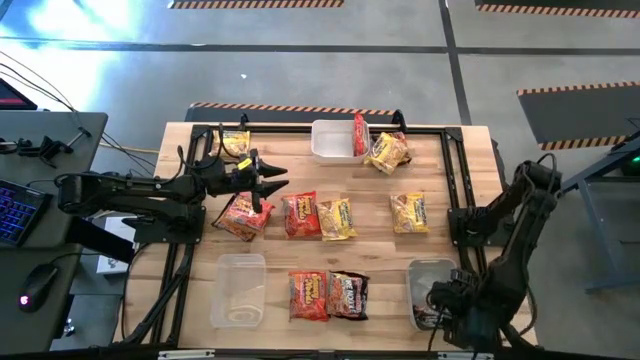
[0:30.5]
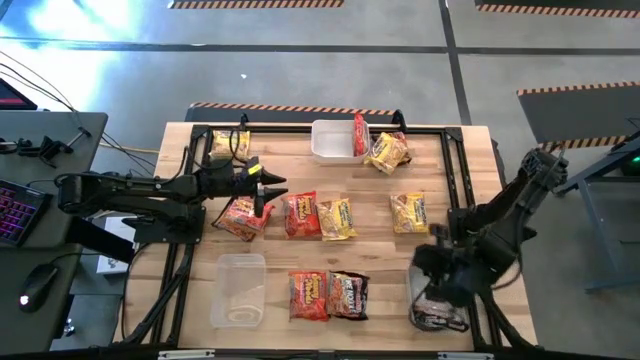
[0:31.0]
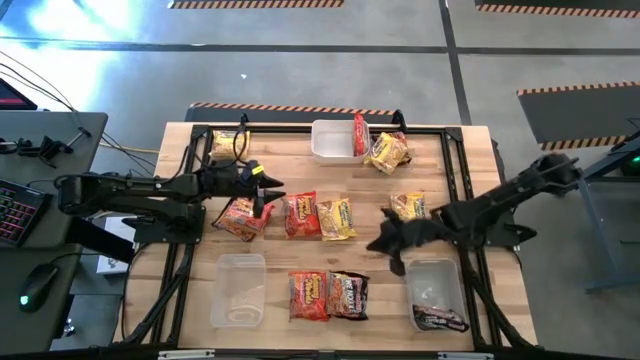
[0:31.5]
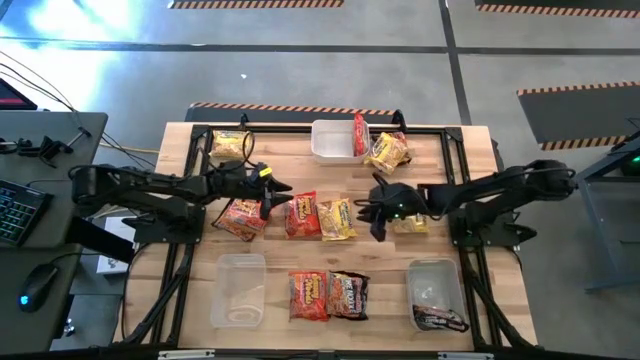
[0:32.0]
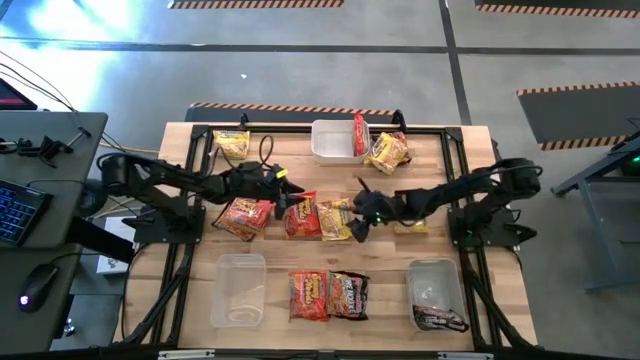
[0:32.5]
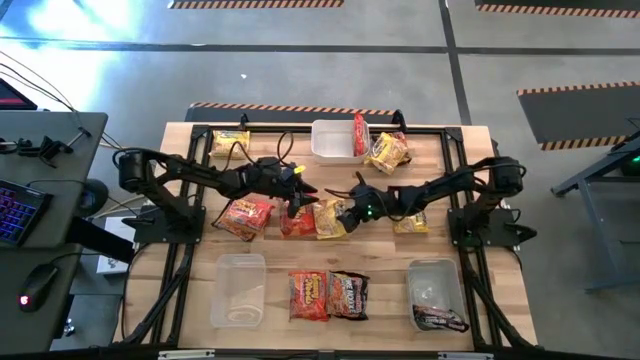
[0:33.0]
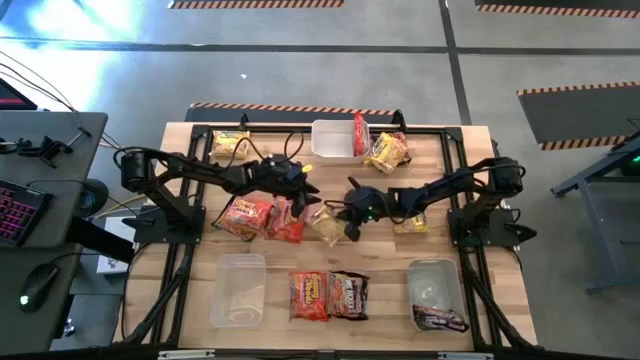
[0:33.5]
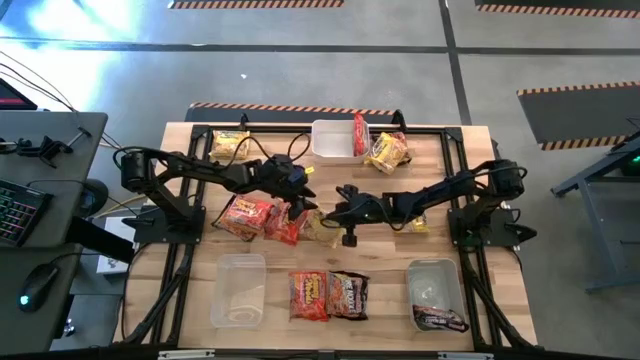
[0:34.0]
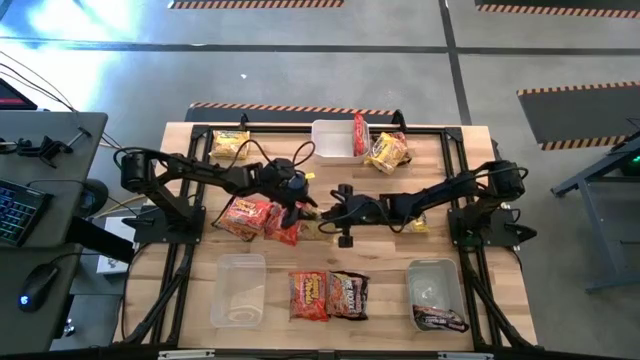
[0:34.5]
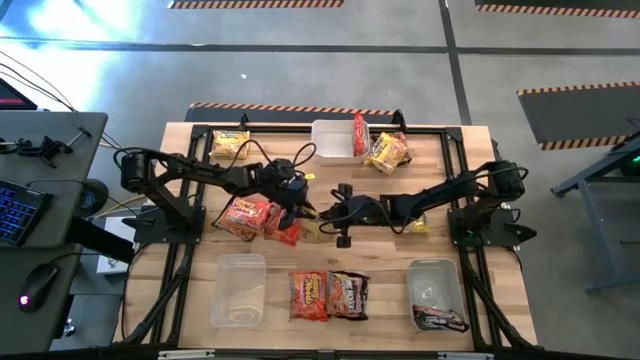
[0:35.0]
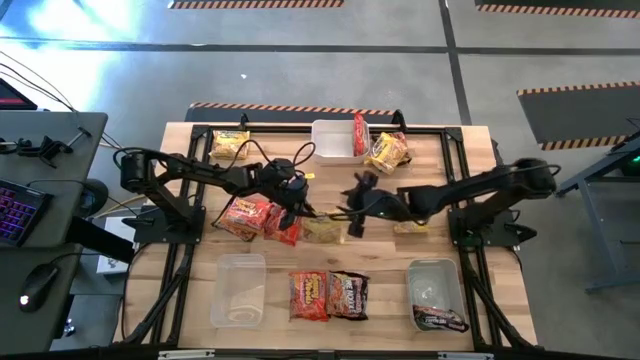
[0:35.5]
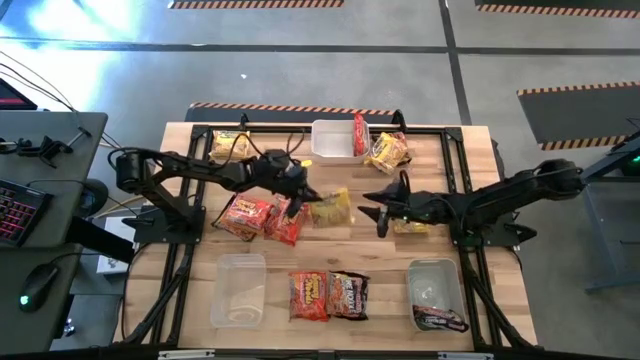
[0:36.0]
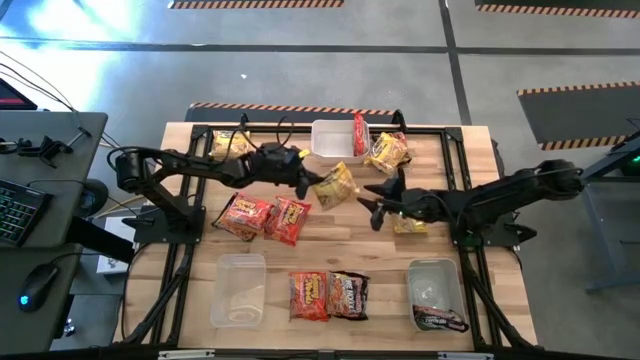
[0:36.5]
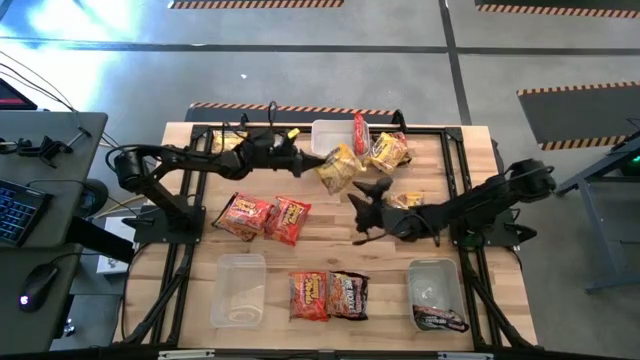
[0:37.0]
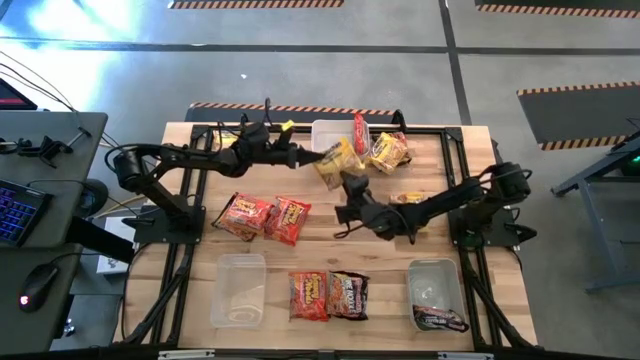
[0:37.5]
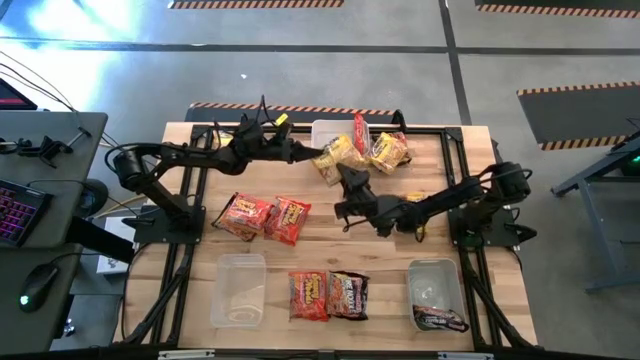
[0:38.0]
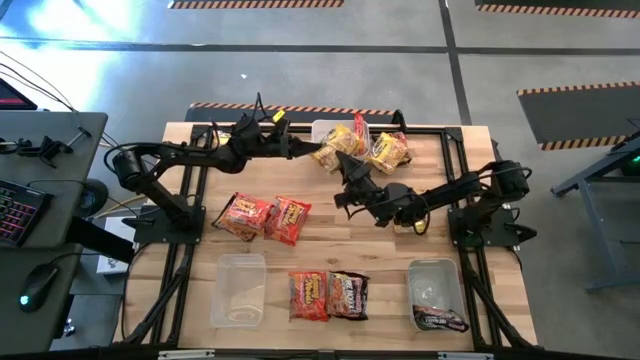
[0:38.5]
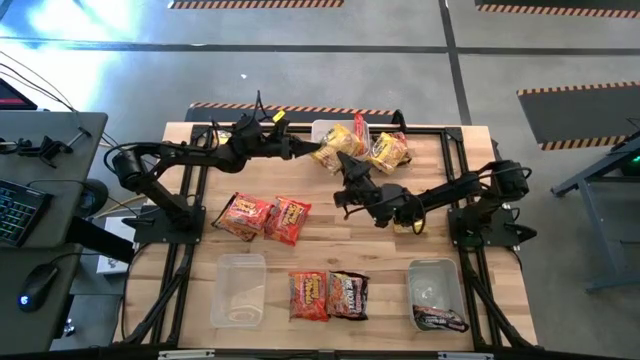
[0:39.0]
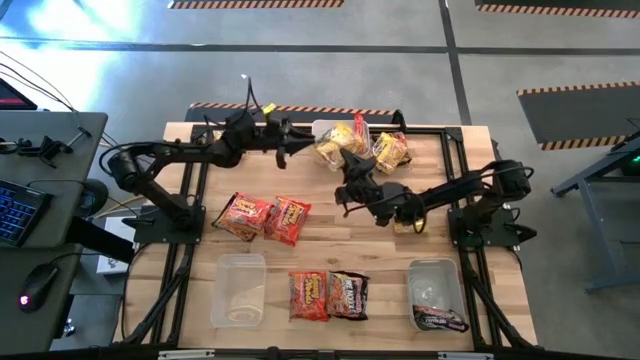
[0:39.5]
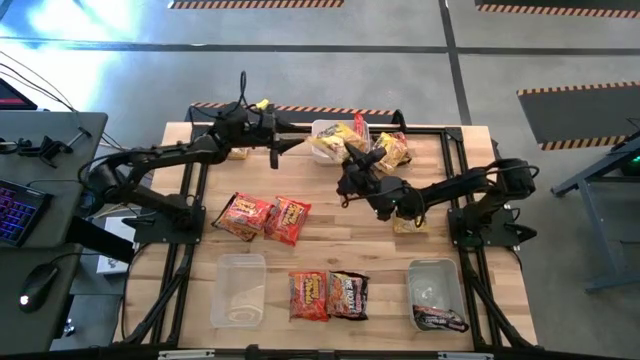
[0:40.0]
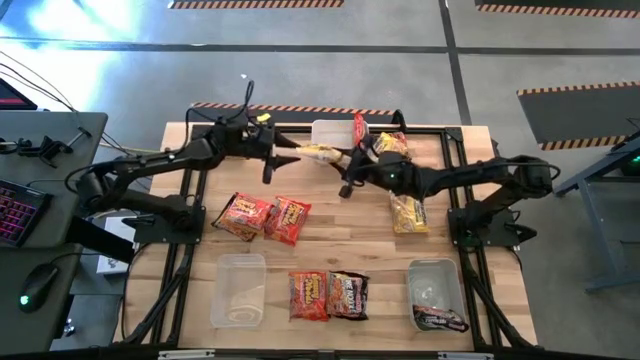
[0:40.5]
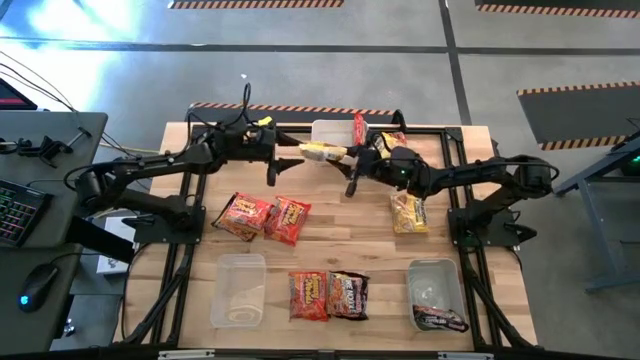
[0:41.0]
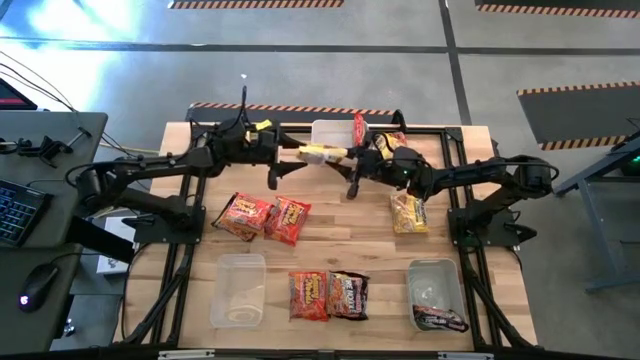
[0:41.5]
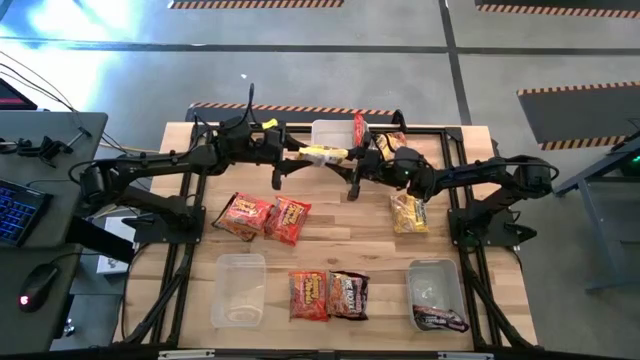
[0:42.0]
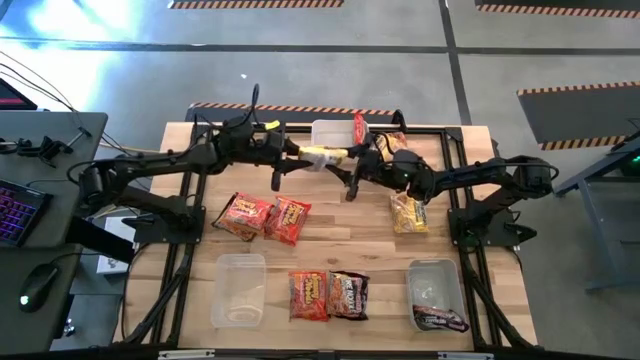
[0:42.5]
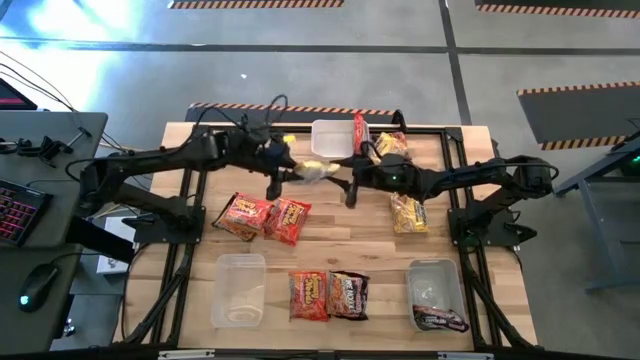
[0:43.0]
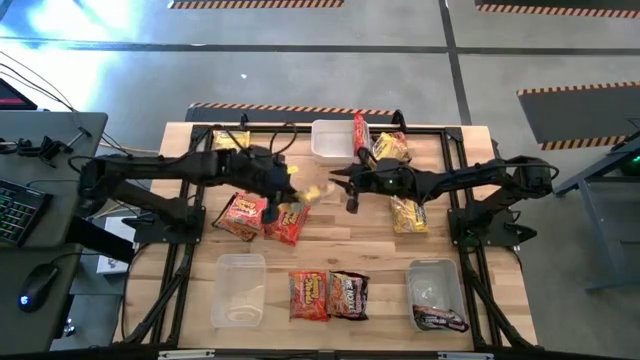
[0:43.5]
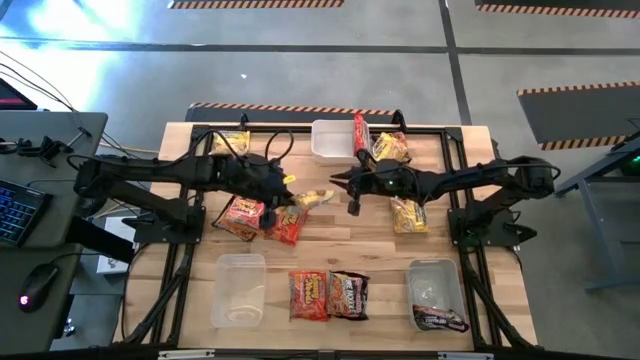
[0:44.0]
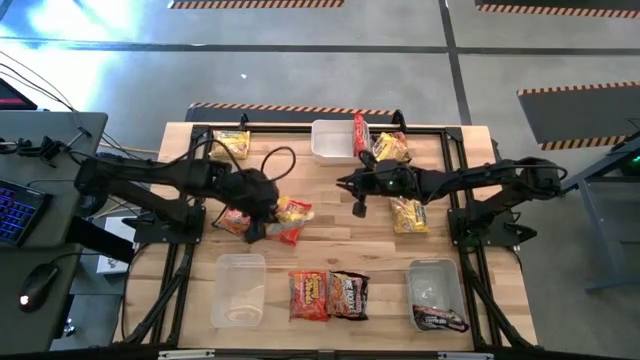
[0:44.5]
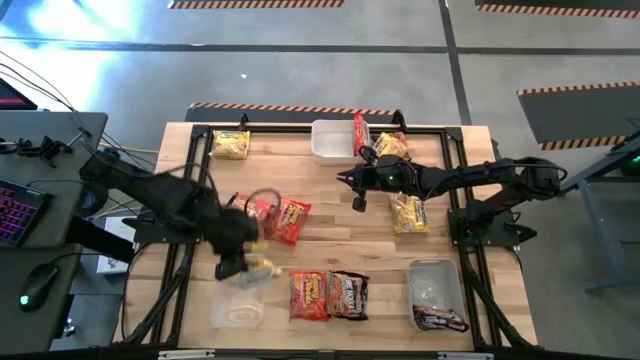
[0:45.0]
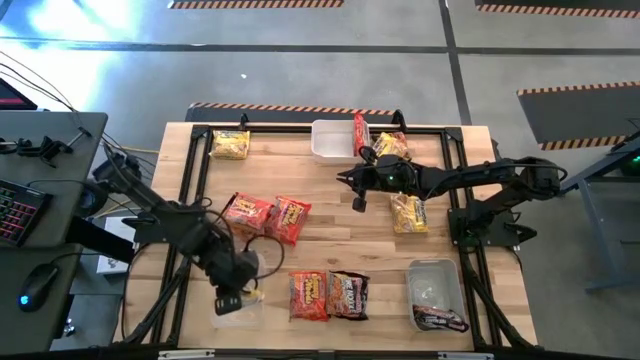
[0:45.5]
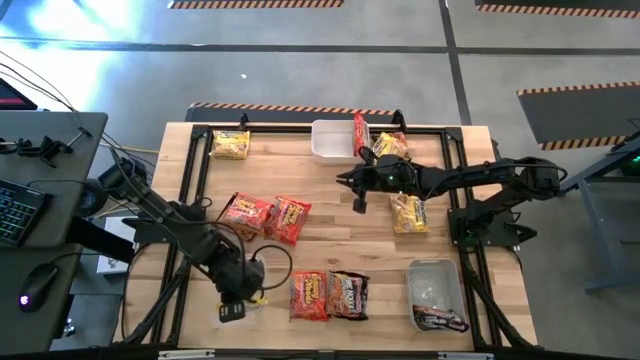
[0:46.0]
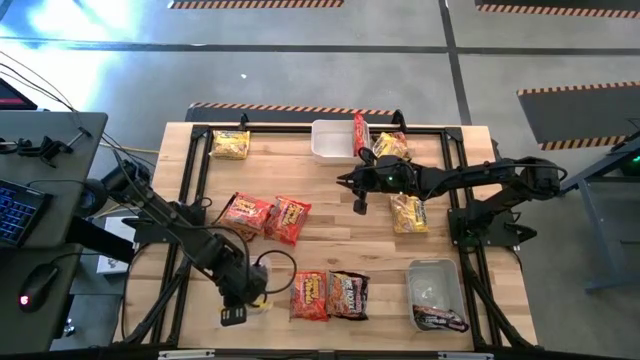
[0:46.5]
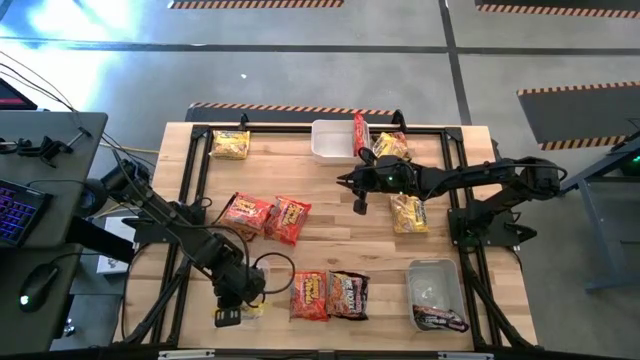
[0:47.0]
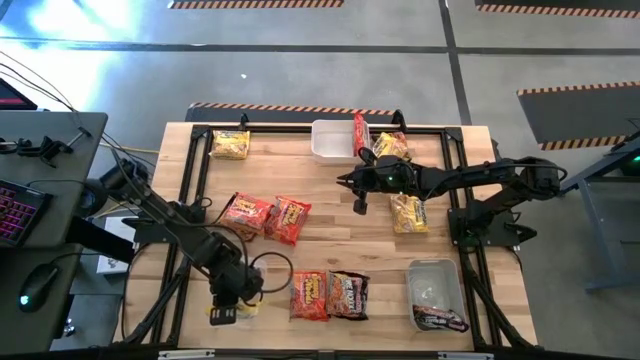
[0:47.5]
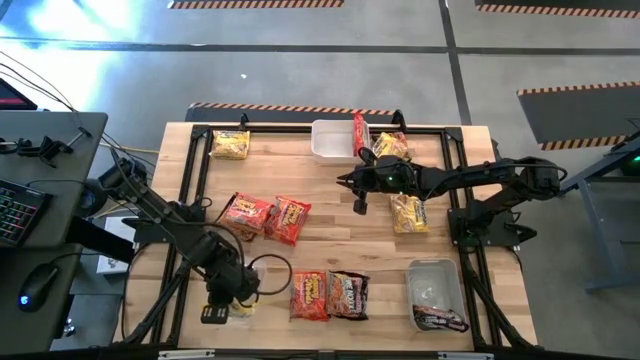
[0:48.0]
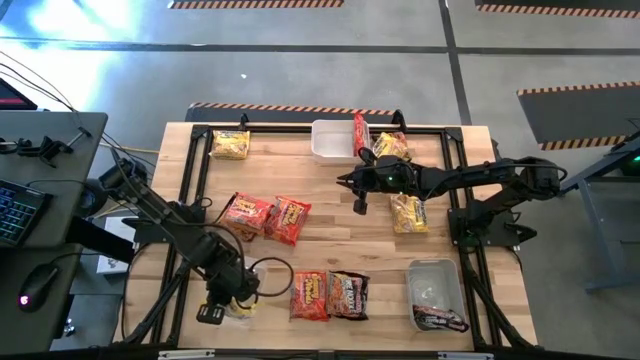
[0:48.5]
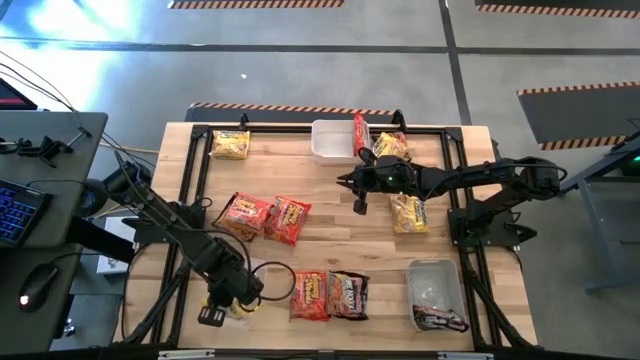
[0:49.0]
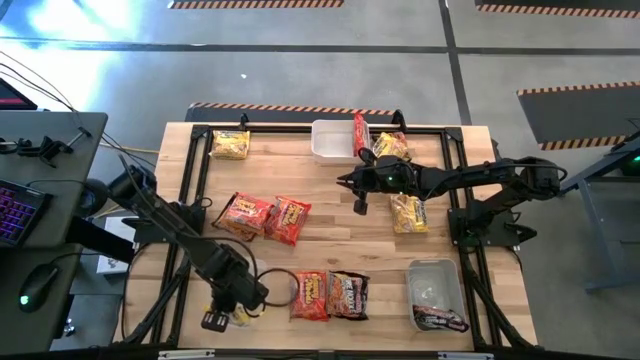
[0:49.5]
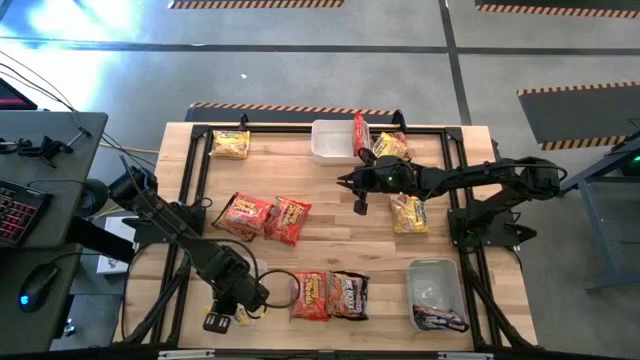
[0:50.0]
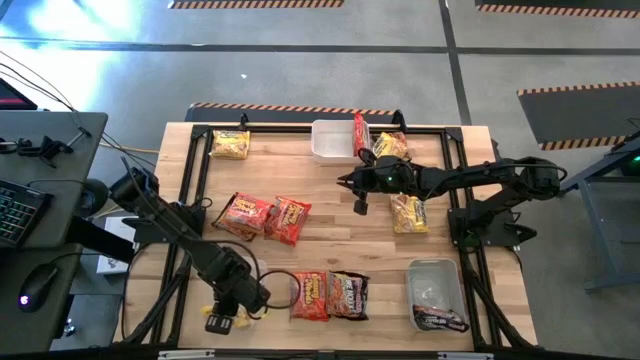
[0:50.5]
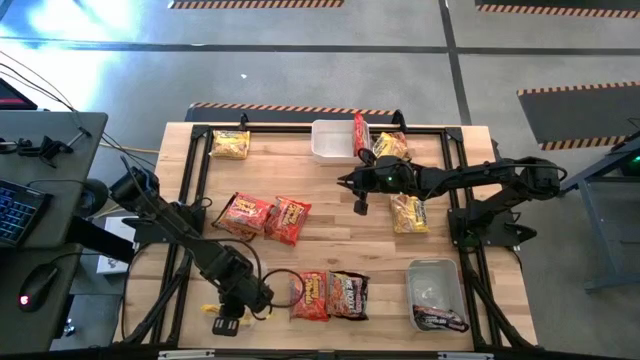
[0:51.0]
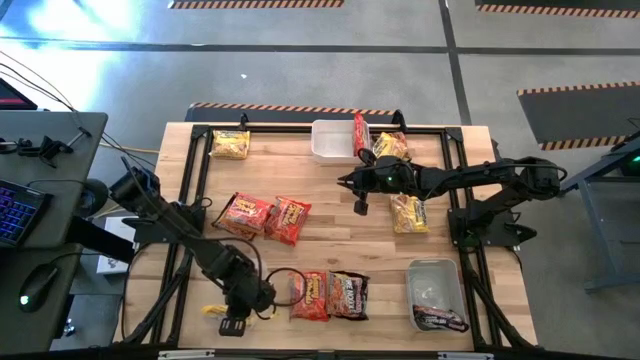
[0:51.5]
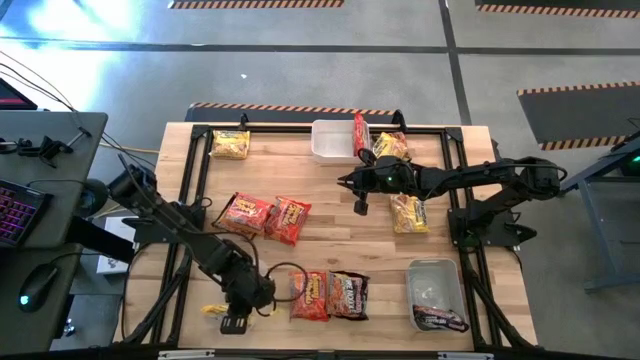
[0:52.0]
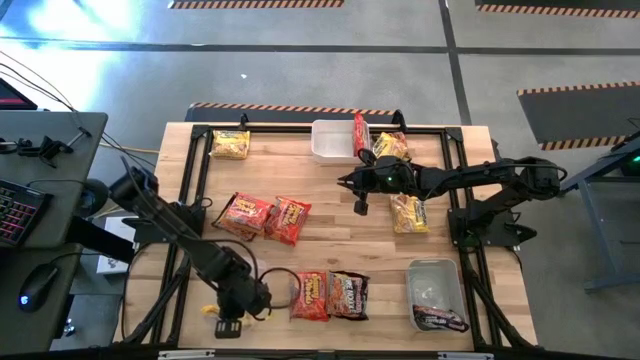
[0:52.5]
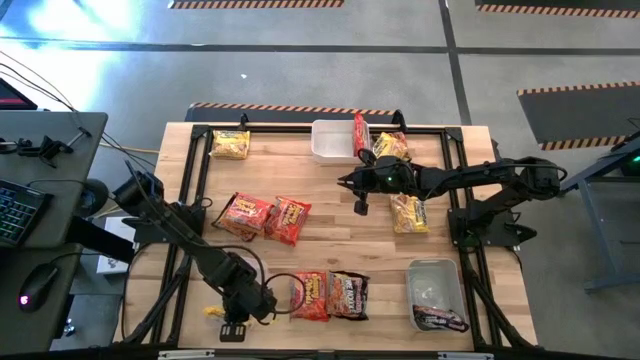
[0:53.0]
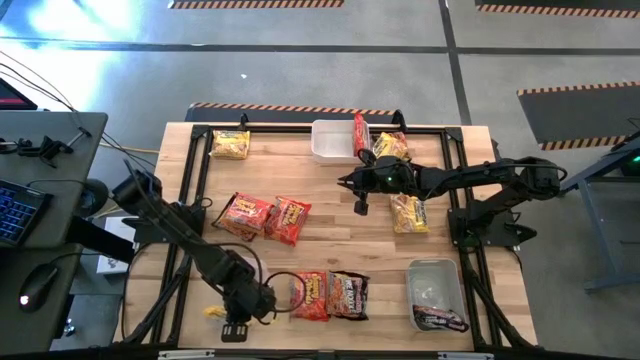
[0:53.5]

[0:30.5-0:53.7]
Task: Sort Maruchan noodles
Put the yellow noodle pack into the transparent bin
